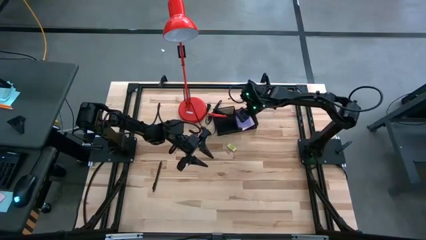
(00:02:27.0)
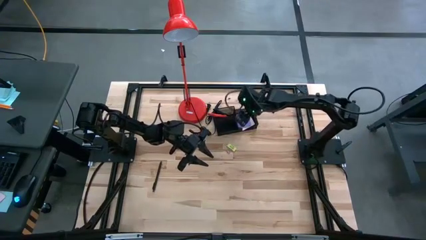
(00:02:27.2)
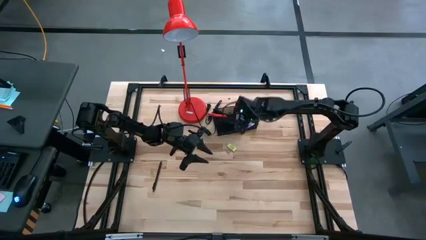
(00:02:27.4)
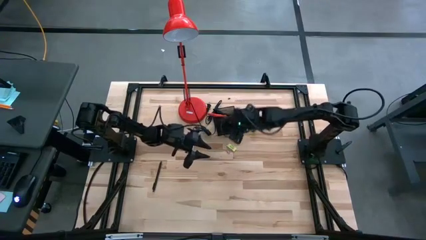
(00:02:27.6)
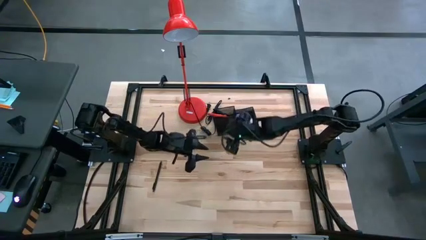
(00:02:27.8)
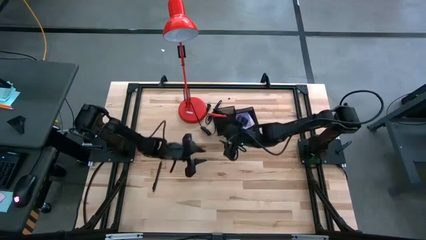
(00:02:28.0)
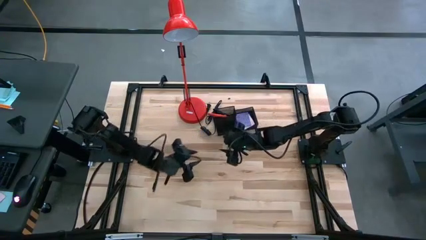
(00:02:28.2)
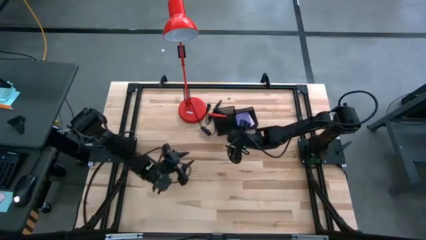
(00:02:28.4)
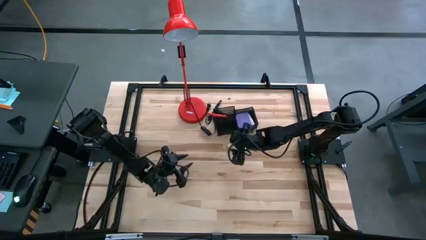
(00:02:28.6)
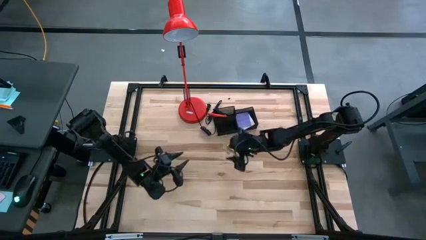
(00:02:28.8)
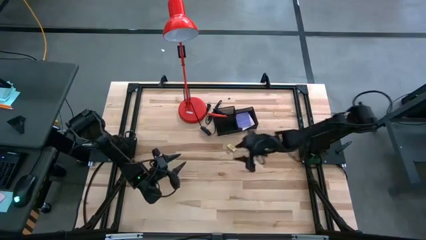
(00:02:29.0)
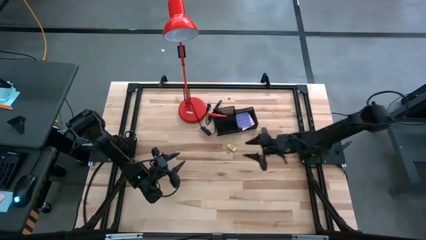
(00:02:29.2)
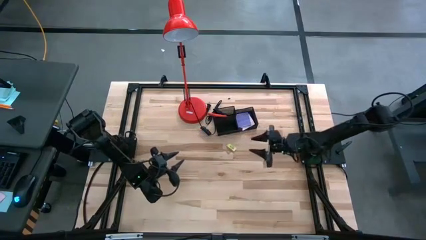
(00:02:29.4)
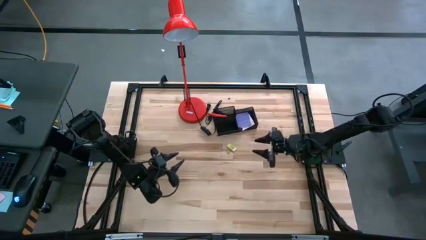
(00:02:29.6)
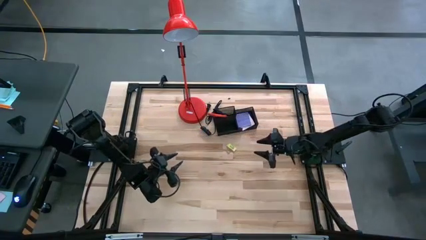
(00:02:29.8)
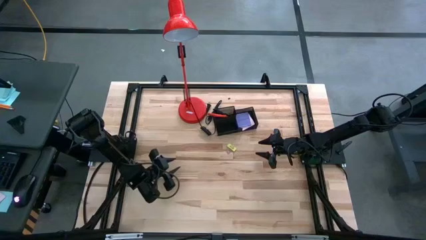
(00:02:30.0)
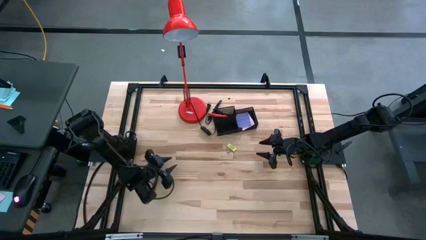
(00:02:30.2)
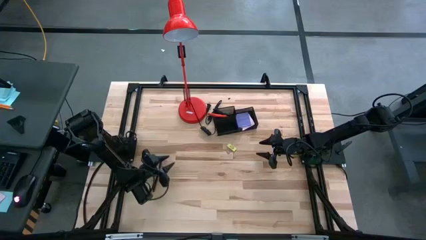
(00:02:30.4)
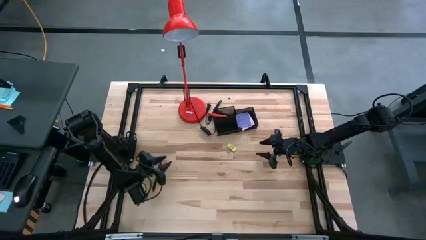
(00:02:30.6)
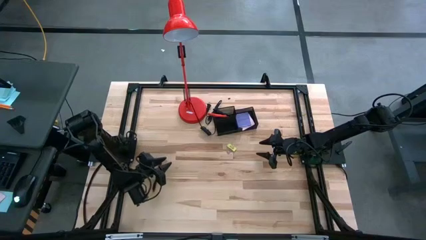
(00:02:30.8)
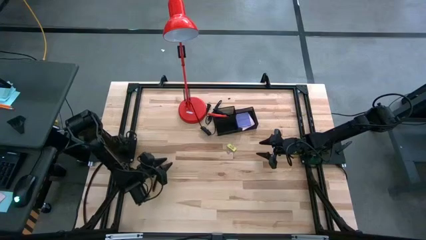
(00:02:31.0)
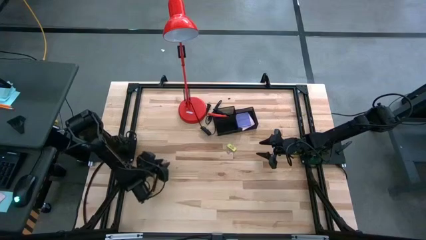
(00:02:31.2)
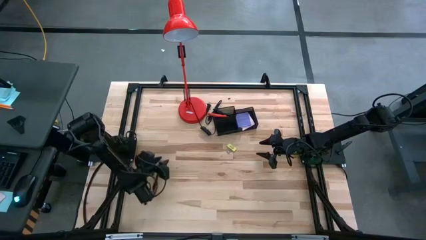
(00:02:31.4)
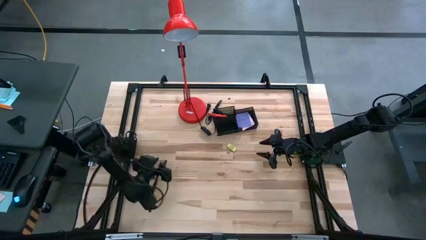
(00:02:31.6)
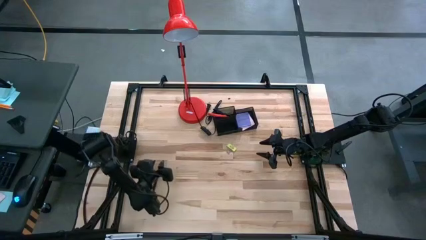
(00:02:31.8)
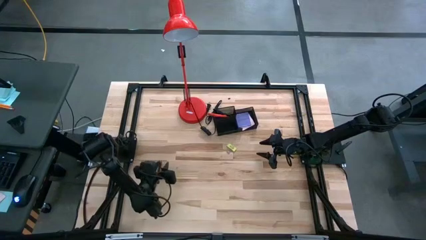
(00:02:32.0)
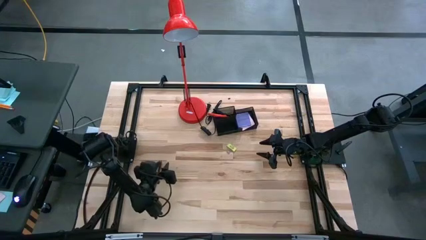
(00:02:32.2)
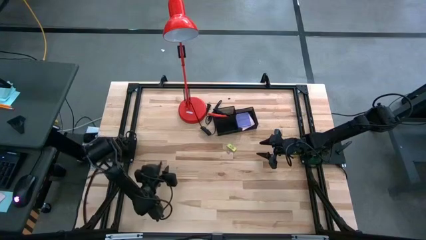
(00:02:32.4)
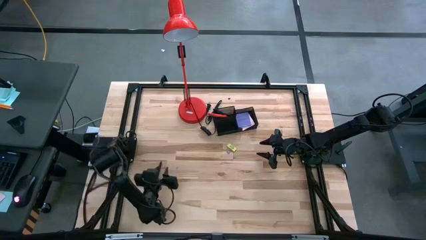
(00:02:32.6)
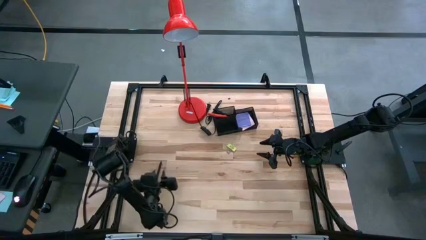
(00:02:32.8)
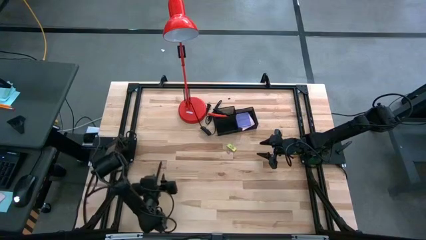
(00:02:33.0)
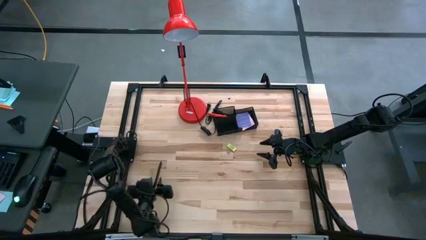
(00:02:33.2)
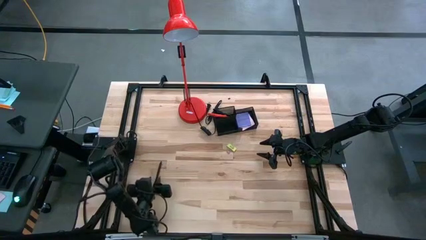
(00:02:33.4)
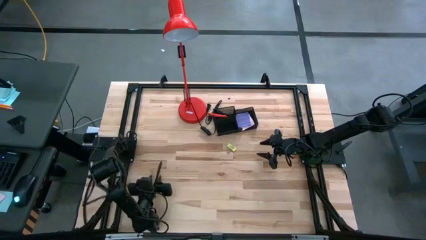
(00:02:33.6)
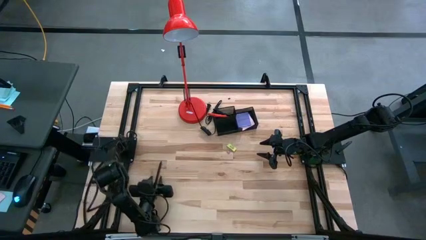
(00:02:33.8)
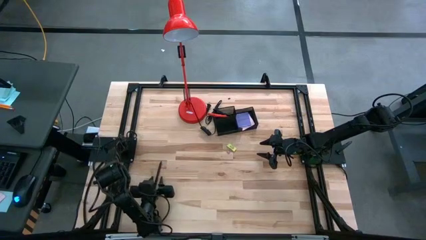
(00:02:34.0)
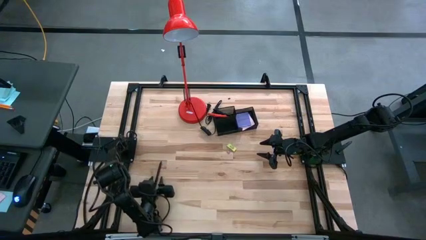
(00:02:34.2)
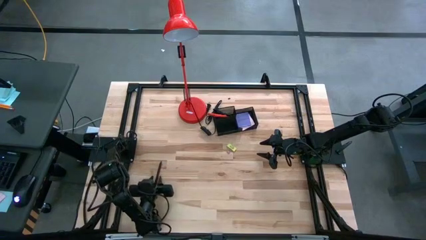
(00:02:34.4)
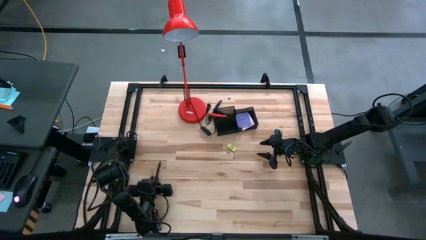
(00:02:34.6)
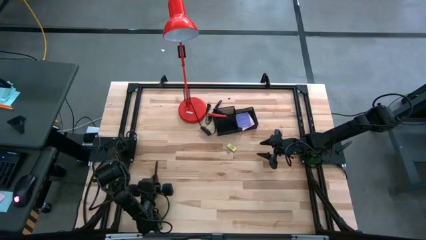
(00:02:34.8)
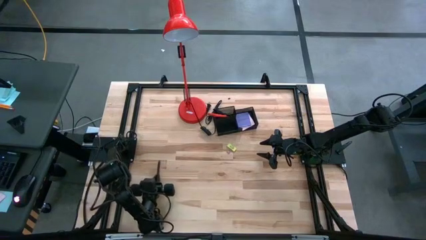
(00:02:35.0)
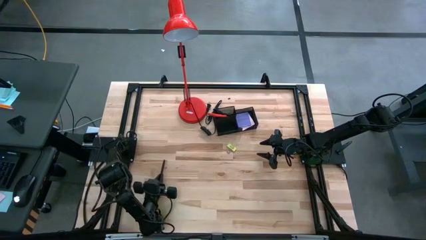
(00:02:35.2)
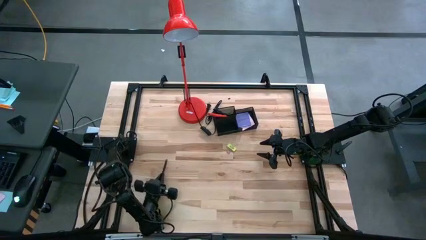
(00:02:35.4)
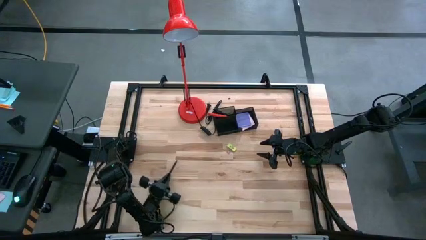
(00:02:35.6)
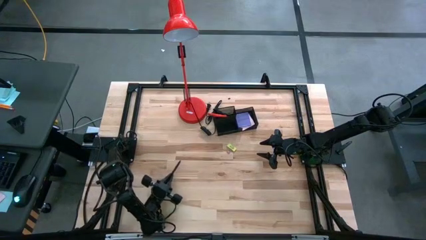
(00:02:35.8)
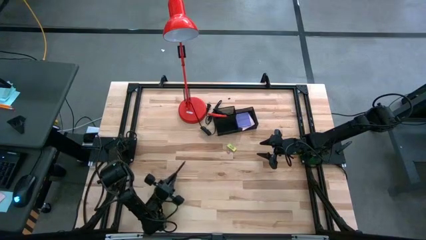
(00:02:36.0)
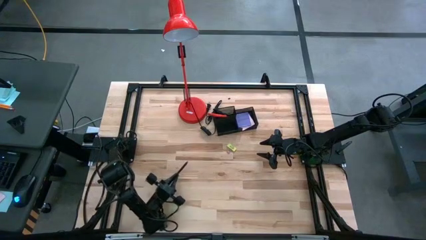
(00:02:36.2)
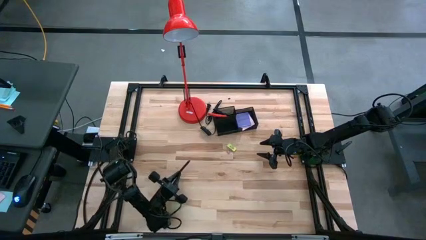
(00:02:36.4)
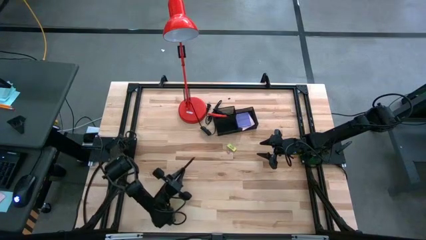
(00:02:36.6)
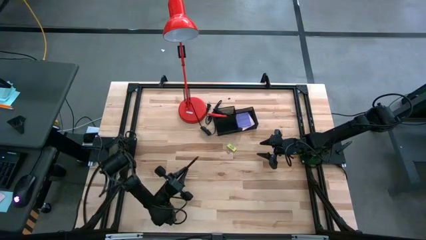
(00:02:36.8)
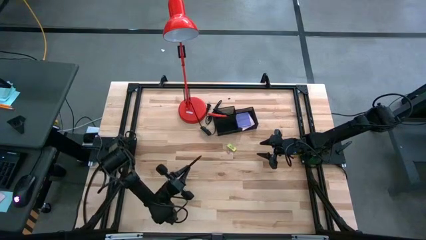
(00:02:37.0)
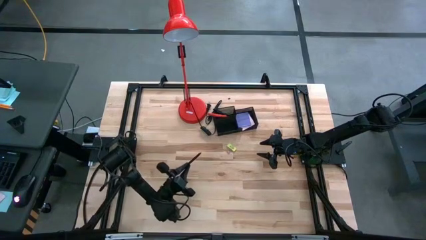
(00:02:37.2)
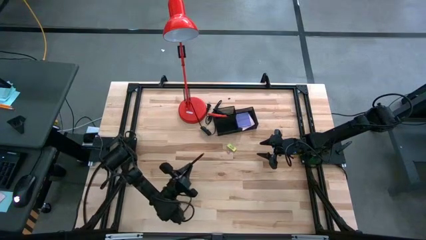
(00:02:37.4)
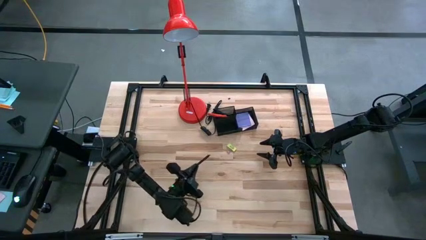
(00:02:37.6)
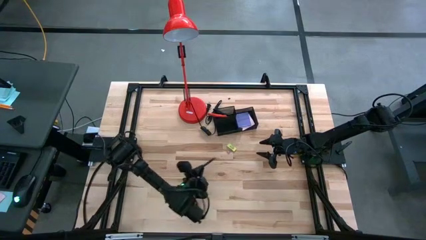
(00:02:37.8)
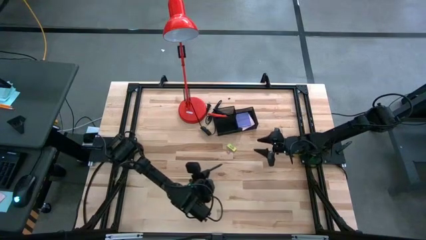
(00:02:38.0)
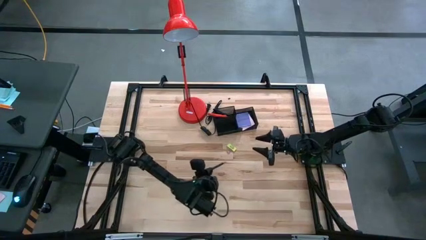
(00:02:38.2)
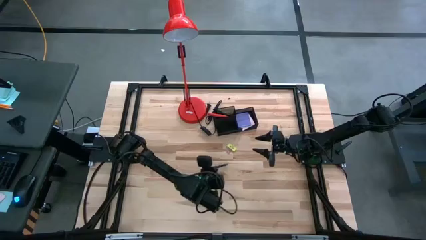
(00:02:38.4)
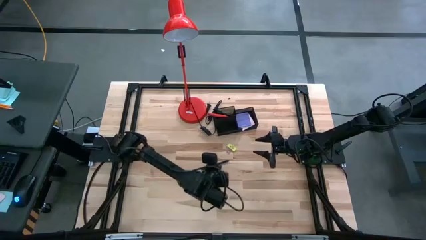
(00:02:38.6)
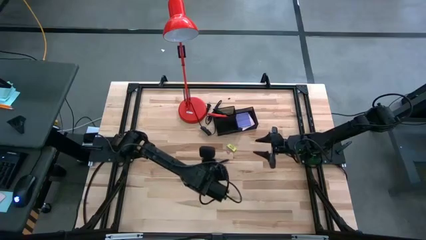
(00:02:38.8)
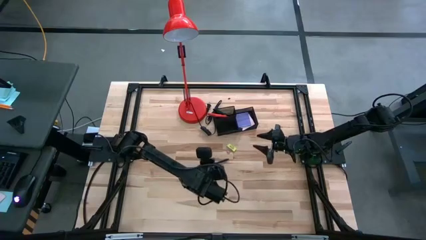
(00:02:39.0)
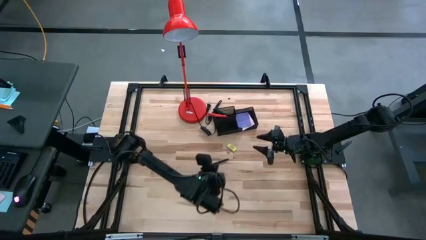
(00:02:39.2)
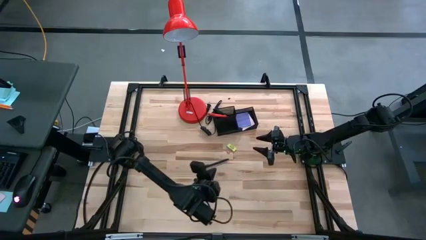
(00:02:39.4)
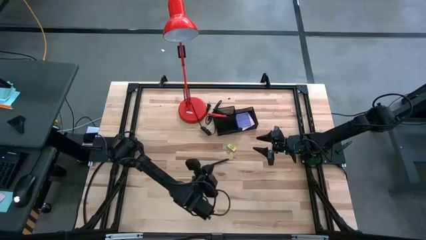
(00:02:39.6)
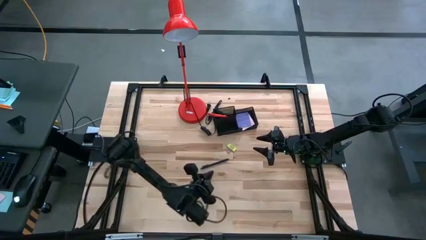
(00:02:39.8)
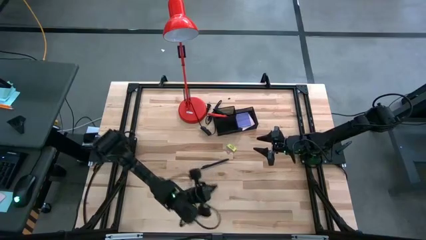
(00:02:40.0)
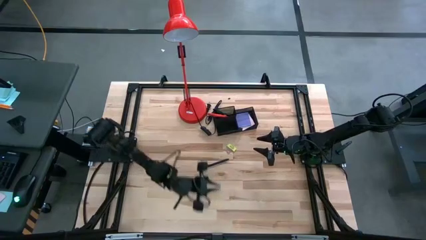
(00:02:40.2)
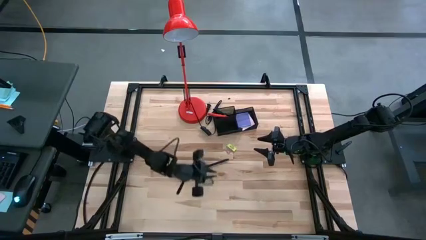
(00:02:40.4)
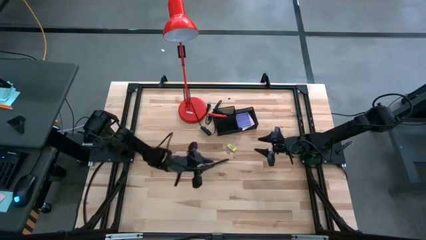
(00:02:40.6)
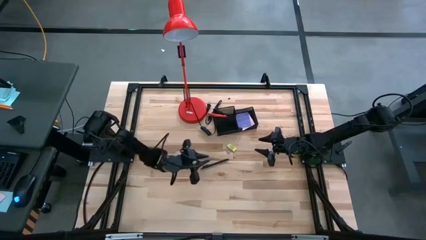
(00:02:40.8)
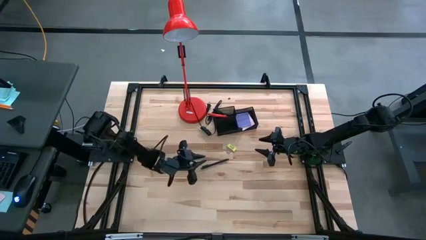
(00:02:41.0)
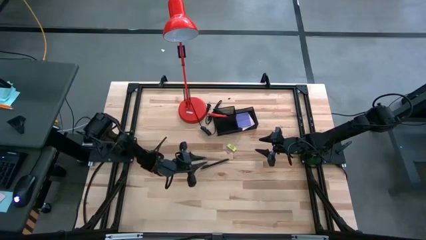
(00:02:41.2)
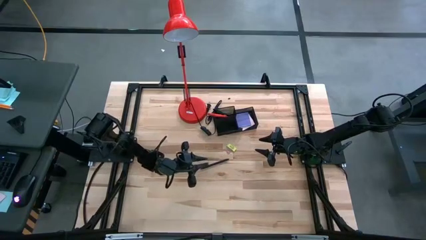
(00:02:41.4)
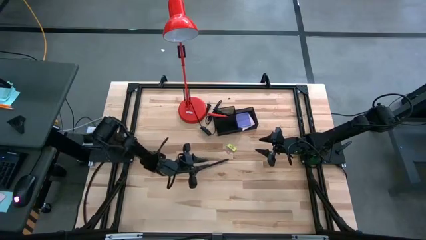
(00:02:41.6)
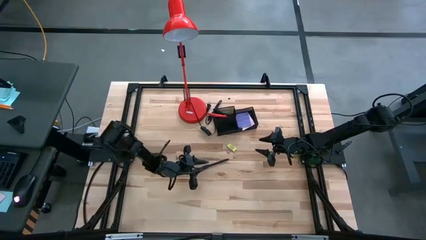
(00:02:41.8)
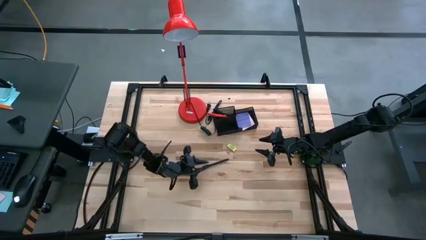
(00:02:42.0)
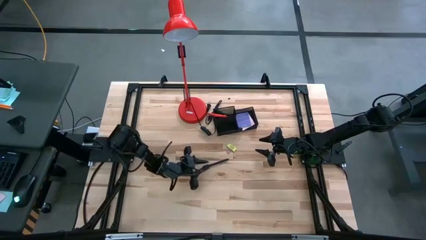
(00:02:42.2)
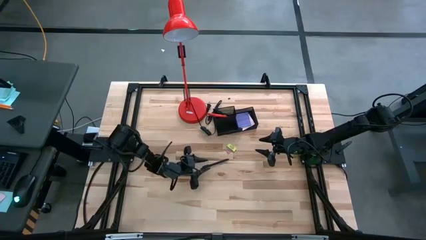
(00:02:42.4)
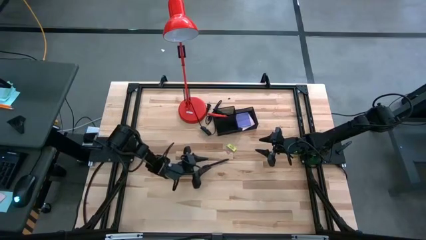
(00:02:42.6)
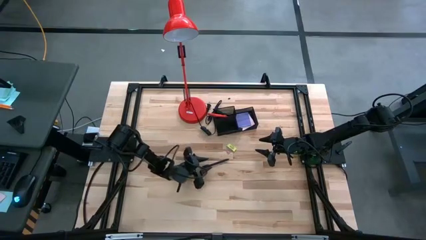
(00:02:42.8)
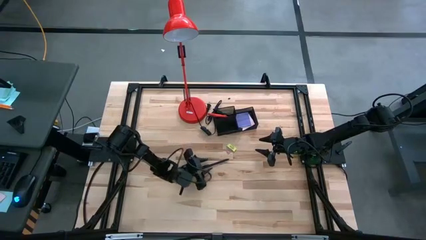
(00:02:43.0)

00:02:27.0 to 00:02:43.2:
Task: Pick and place office supplies into organizer
Put the black pen into the black desk organizer
